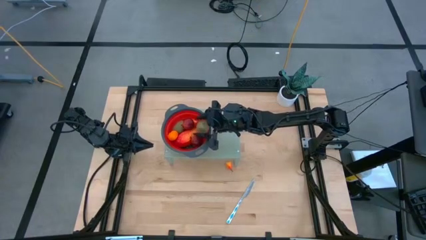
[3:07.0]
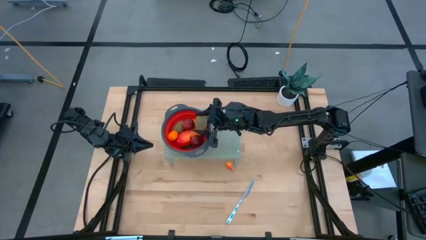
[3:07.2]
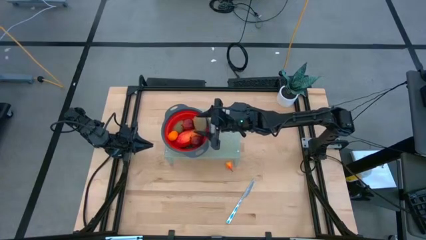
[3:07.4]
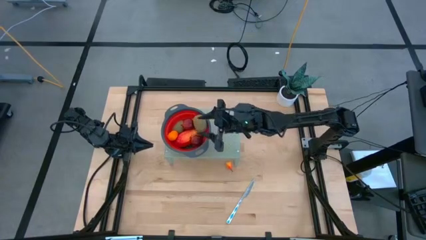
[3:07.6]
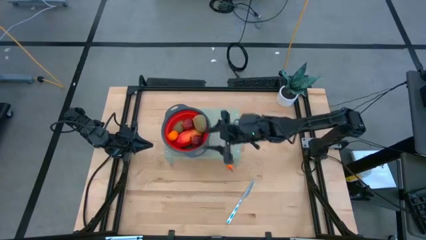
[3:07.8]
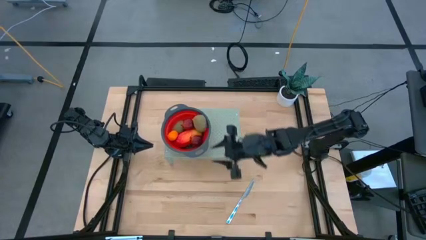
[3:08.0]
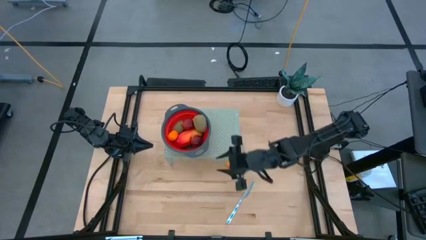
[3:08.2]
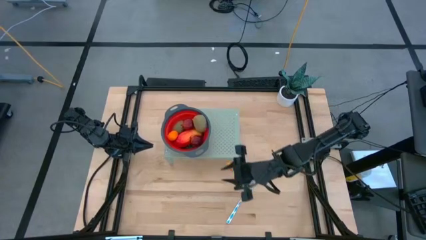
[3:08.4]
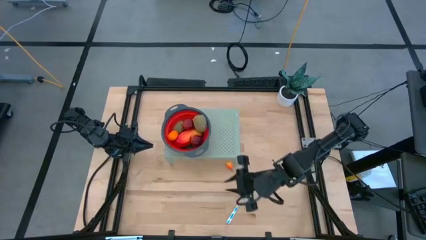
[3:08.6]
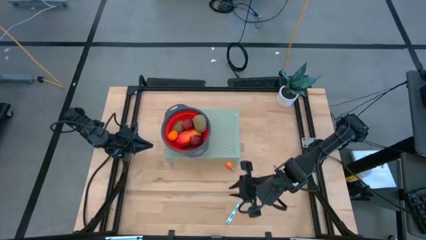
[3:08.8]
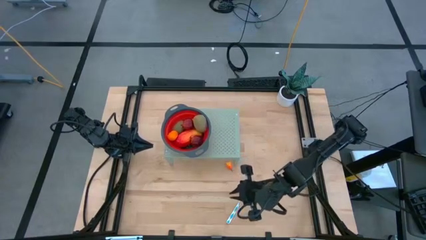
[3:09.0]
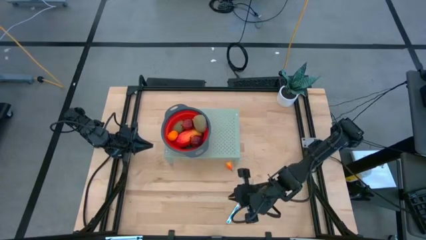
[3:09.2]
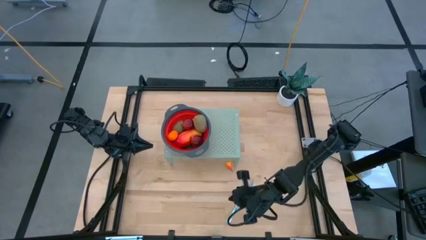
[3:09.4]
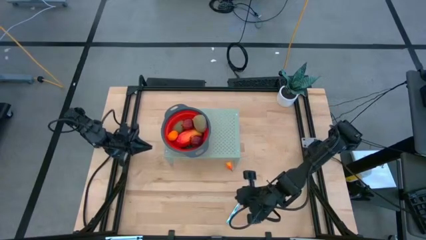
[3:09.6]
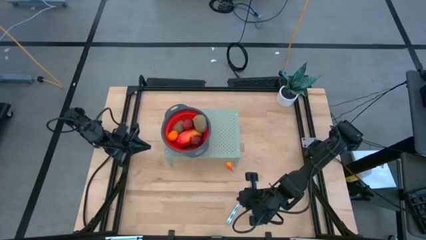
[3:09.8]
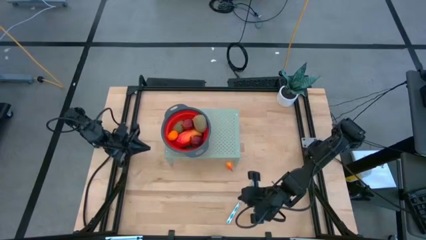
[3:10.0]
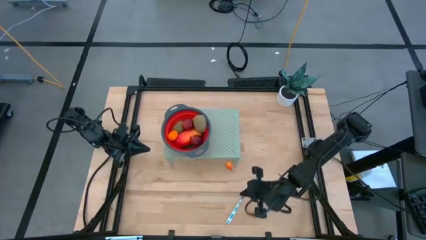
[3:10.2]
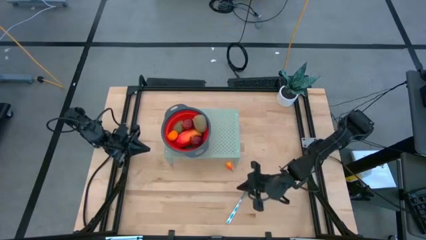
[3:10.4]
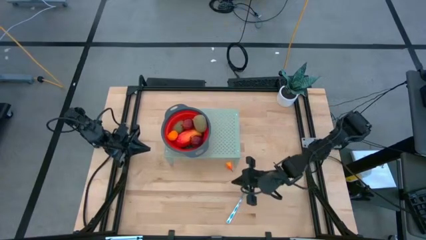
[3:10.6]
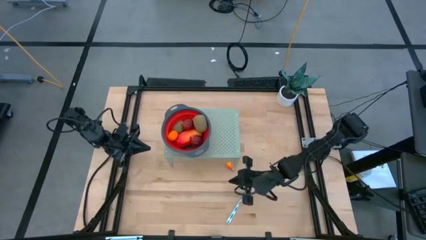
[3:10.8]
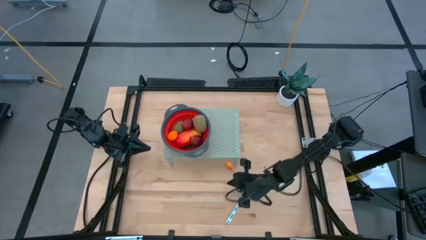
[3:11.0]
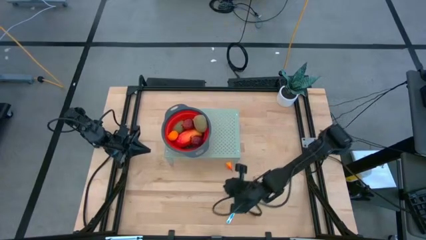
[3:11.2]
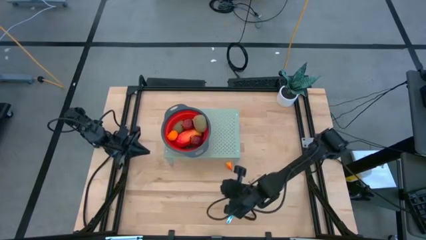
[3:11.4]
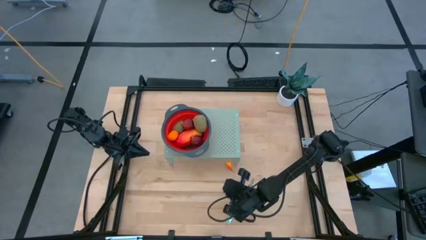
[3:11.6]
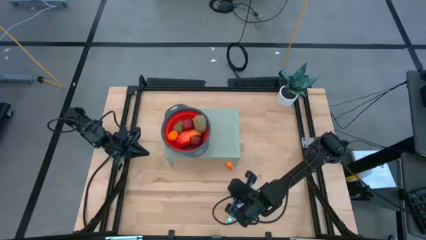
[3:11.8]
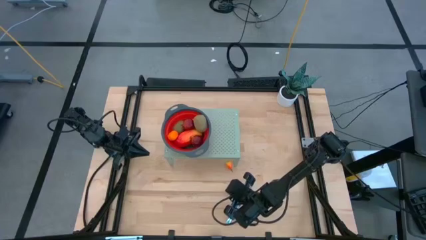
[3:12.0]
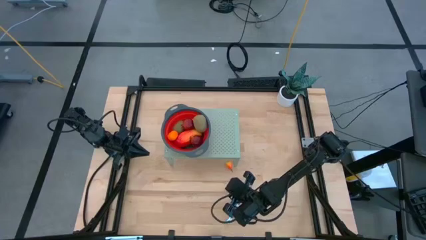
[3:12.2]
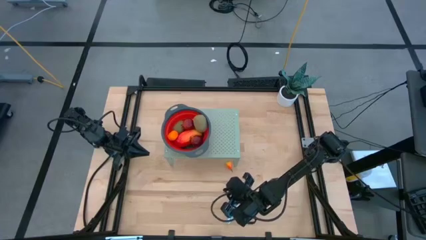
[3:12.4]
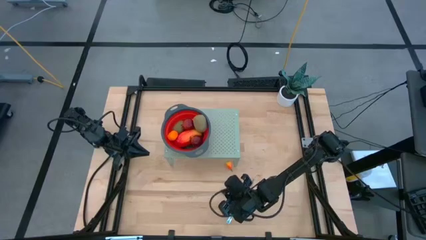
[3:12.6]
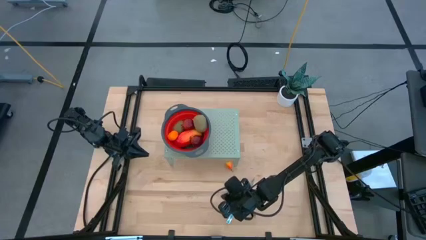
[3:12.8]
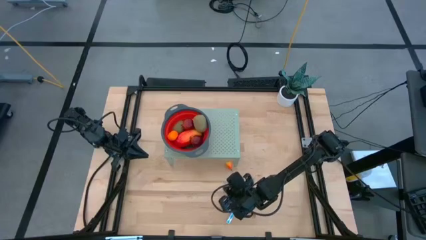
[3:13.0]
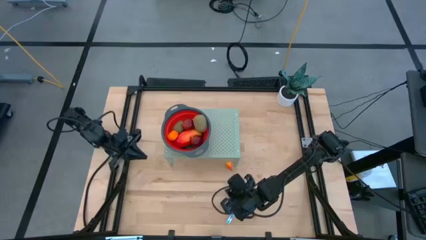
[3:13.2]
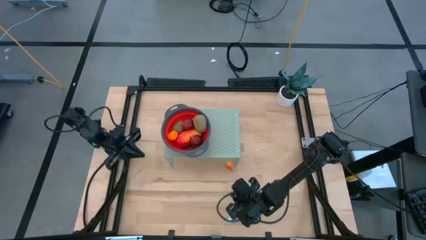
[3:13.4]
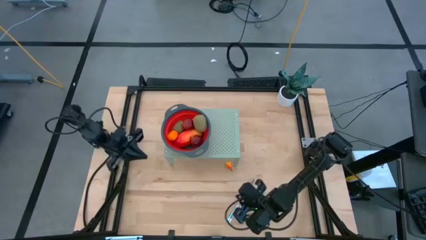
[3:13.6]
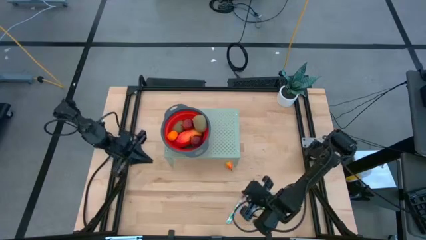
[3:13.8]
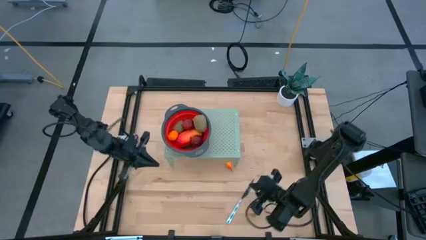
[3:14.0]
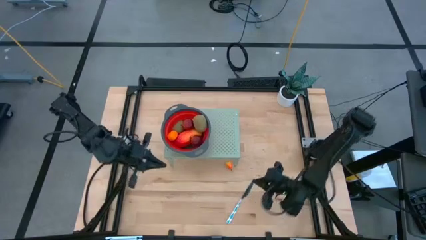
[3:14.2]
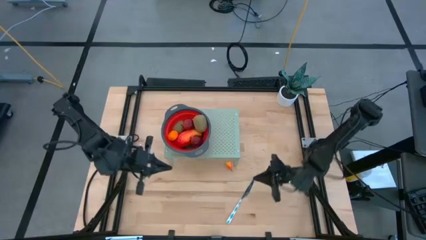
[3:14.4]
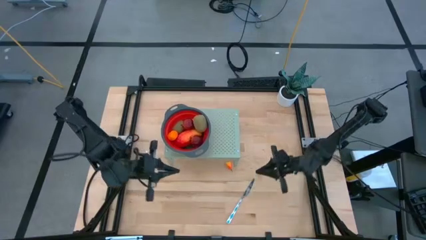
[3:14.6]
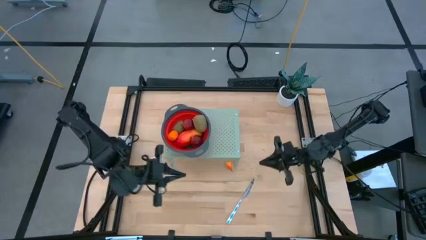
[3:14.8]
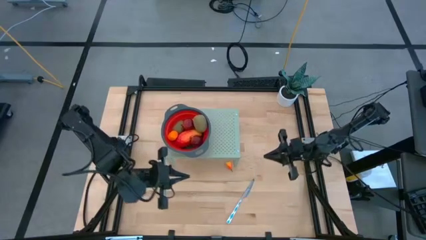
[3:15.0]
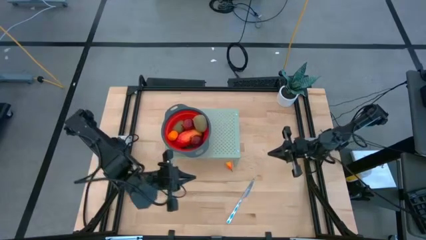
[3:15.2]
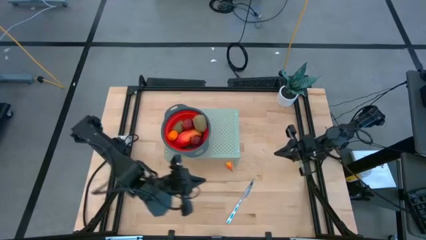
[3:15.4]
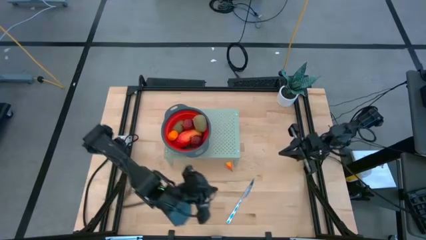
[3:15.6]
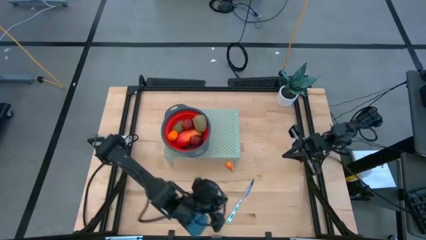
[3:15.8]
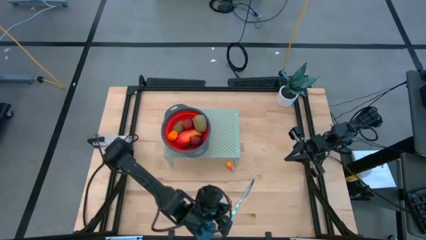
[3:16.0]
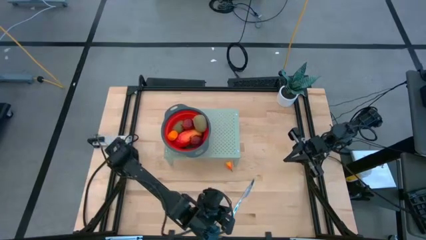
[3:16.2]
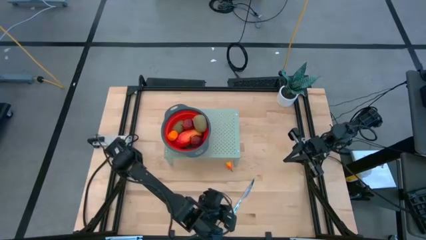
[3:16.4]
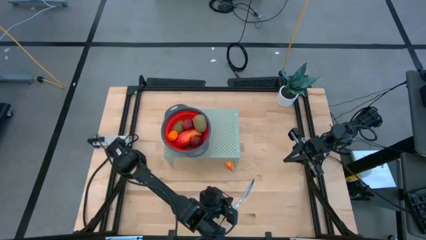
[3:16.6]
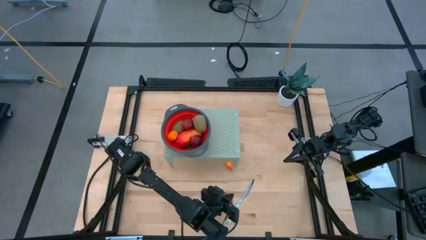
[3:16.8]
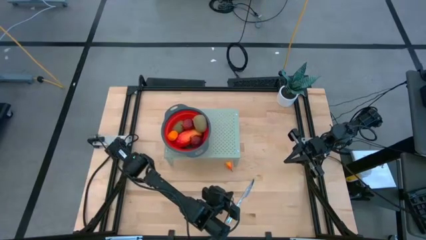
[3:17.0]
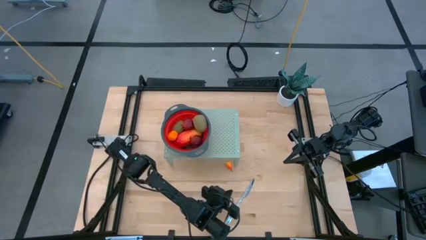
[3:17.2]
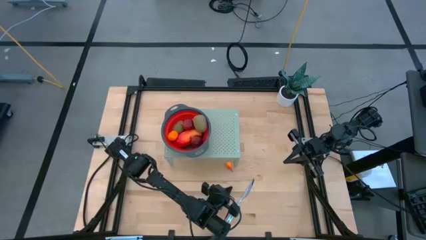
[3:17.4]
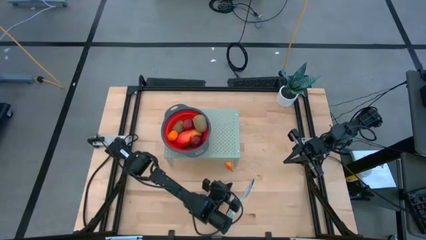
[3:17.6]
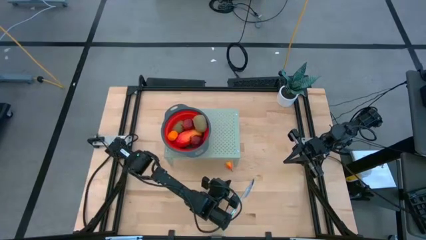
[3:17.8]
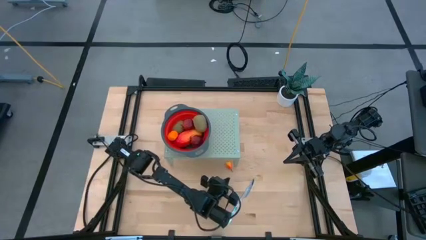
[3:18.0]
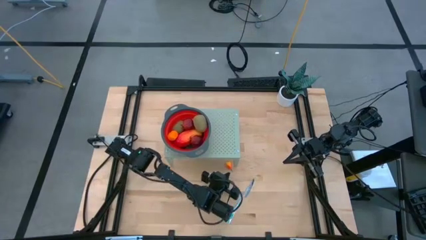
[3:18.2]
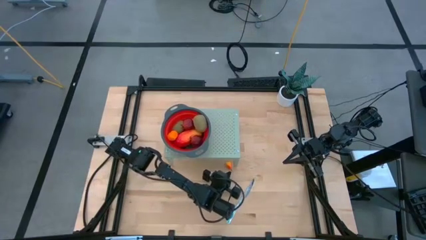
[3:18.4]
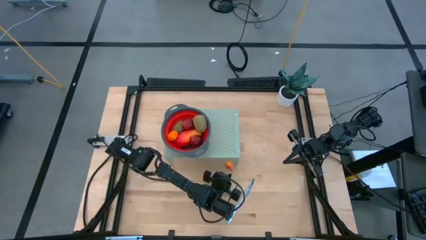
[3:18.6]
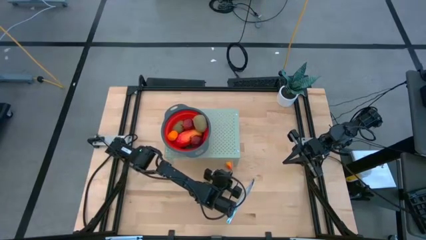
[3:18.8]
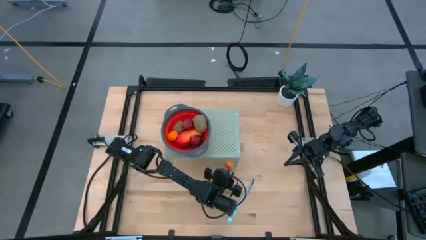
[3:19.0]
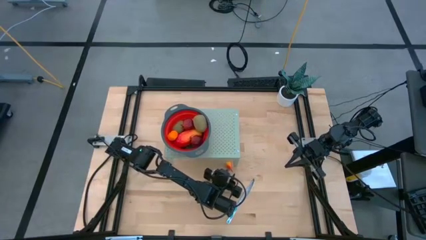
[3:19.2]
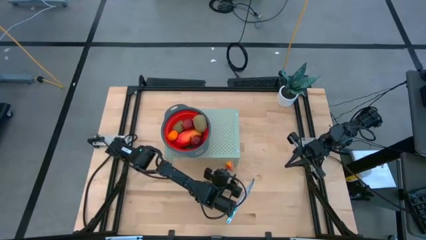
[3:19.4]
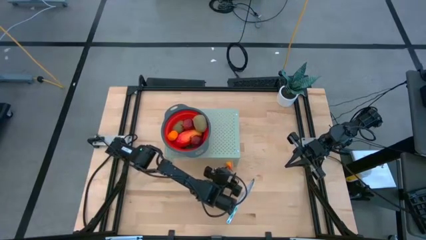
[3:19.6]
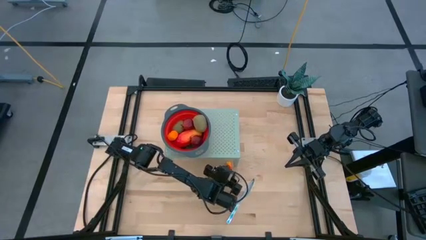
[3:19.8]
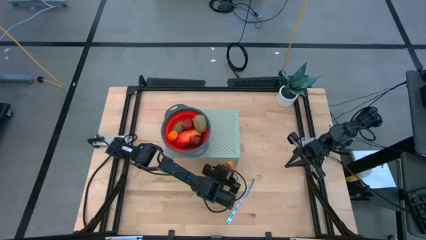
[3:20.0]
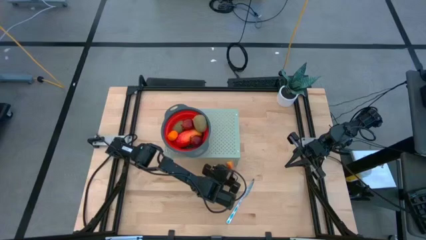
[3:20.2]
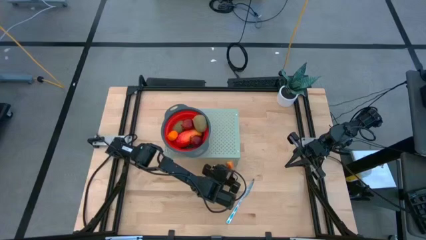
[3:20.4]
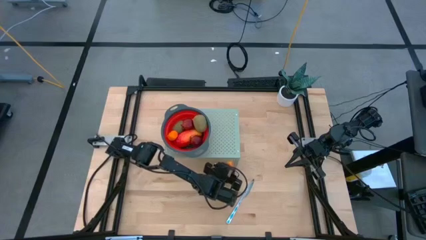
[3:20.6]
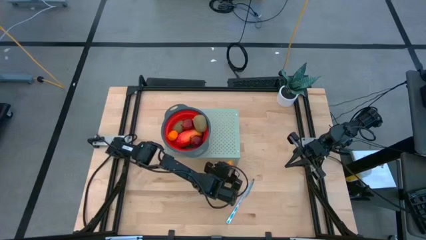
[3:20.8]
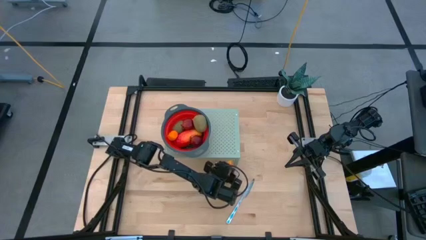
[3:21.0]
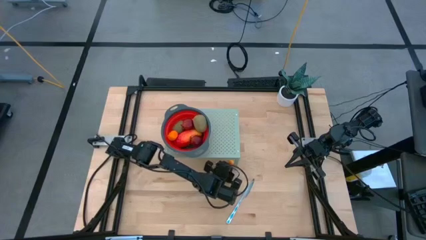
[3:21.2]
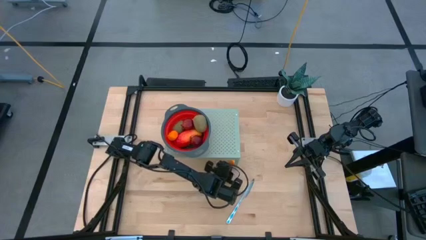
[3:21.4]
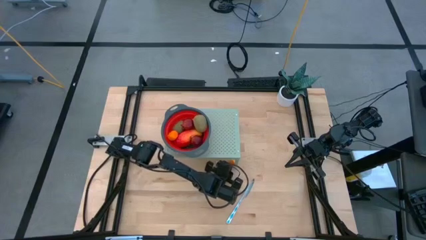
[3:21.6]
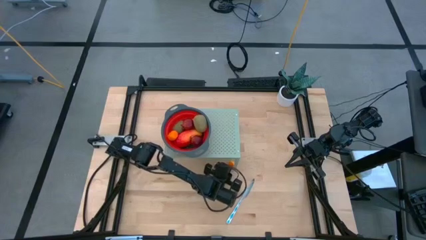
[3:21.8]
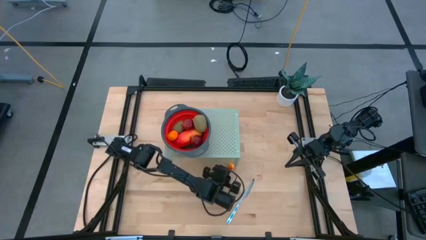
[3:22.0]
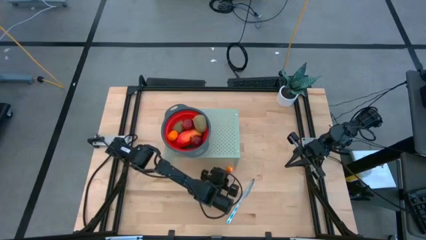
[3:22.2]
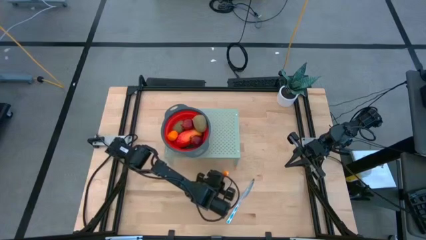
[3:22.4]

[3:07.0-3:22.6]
Task: Pick & Place Fruit
Put the orange pear into the red strainer bowl on the shelf

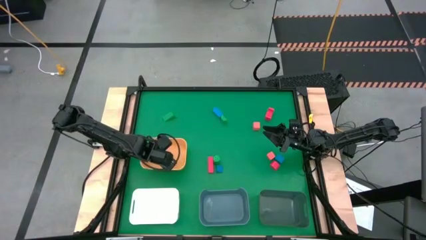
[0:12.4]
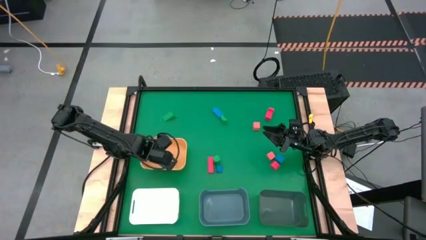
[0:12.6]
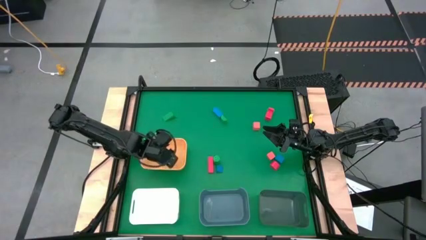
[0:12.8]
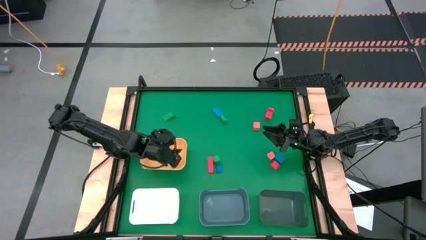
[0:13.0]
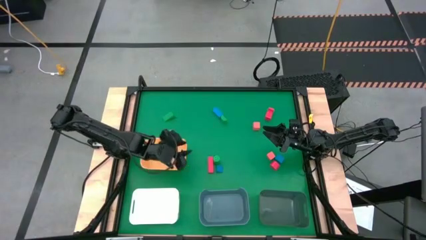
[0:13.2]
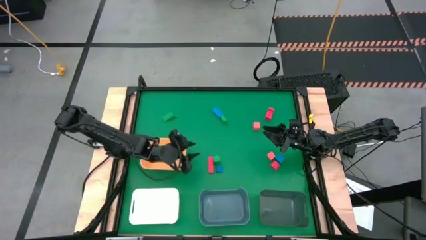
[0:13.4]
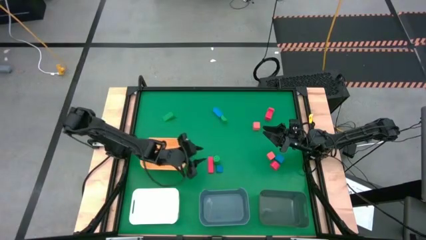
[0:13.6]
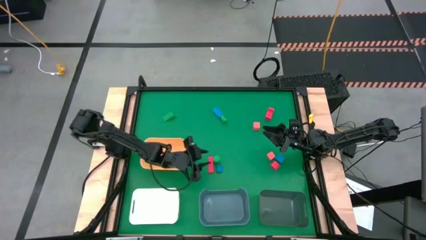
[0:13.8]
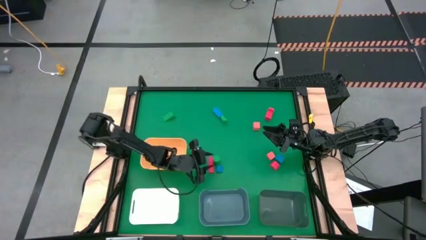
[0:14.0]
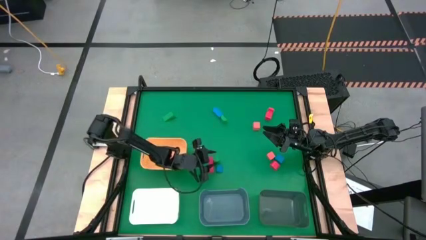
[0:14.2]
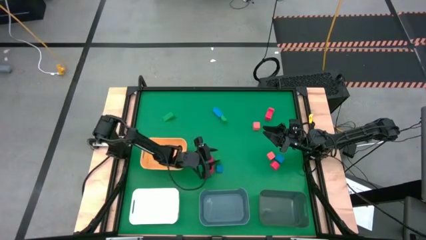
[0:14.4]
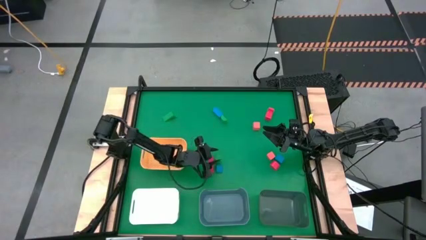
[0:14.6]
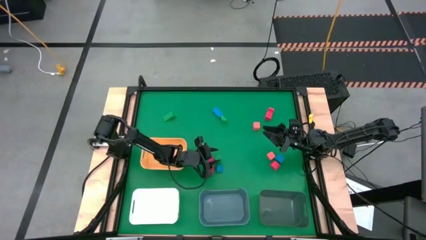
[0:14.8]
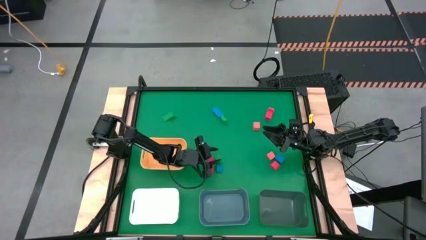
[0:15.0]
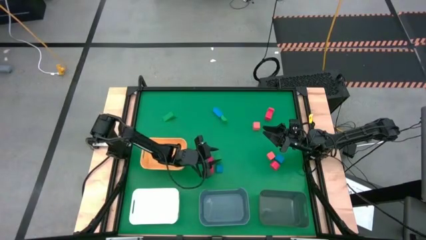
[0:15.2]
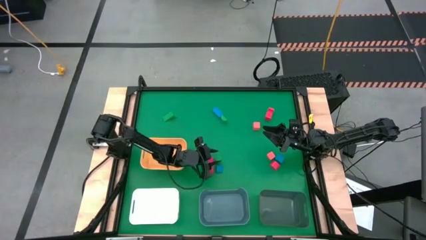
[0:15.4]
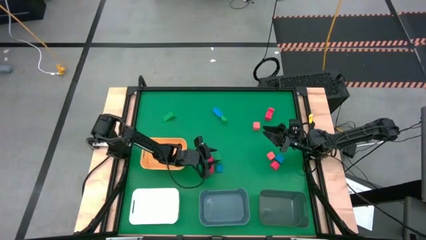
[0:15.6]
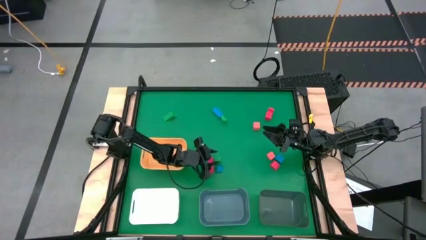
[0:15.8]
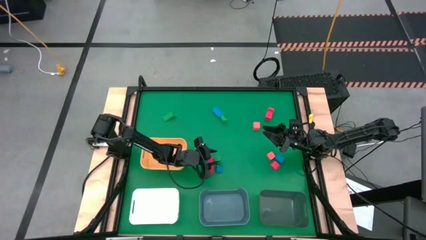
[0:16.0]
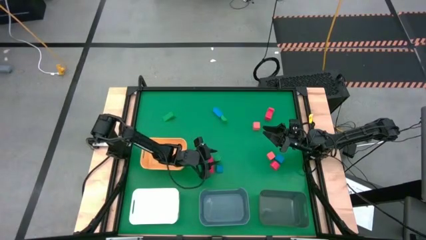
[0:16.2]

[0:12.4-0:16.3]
Task: Sort & place blocks by color
Put the bottom green block into the white bin
